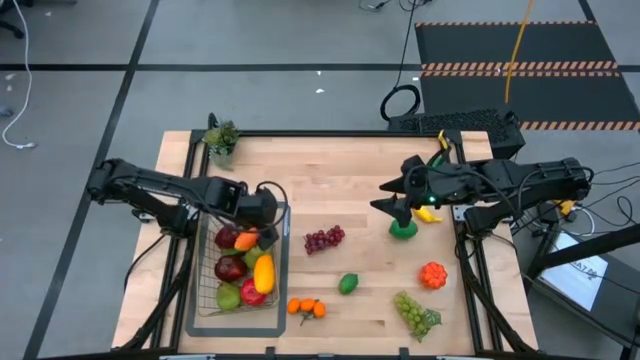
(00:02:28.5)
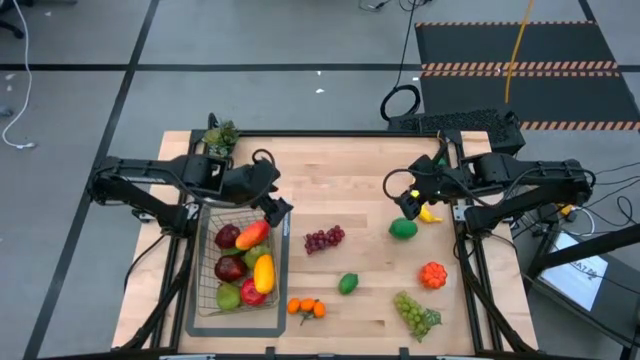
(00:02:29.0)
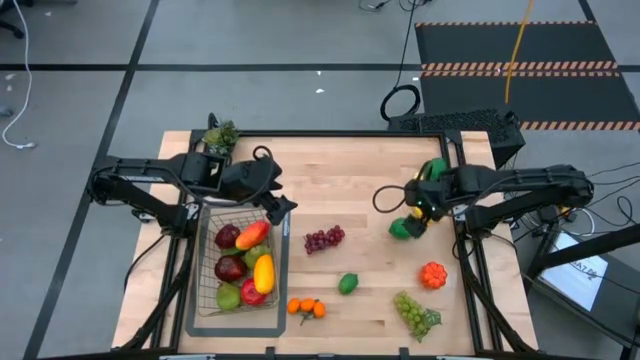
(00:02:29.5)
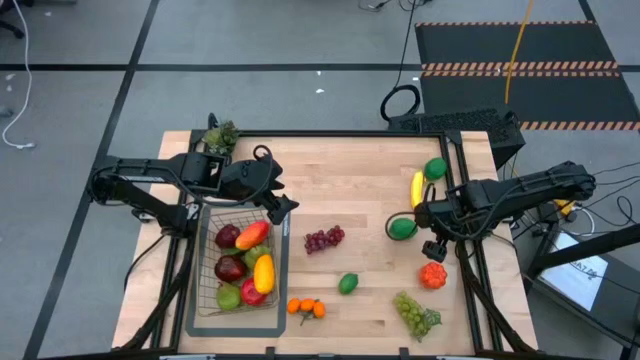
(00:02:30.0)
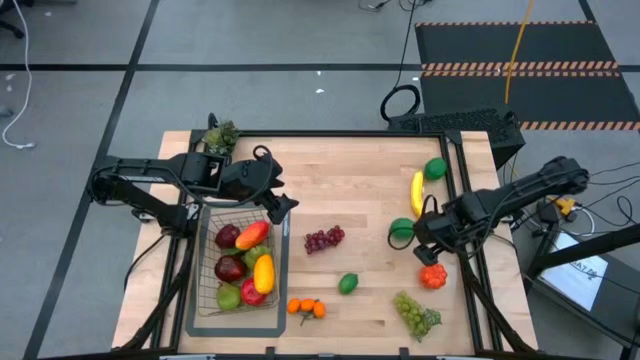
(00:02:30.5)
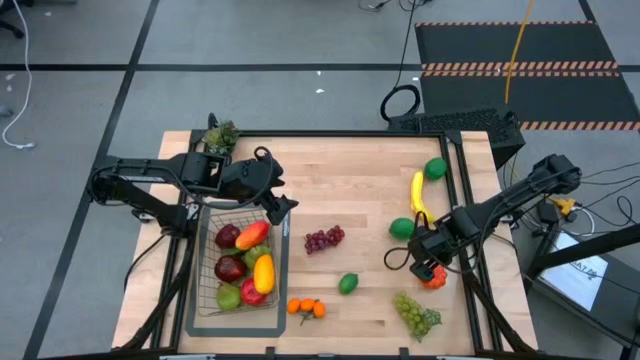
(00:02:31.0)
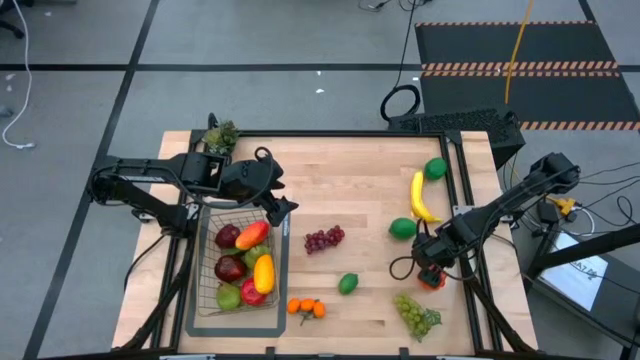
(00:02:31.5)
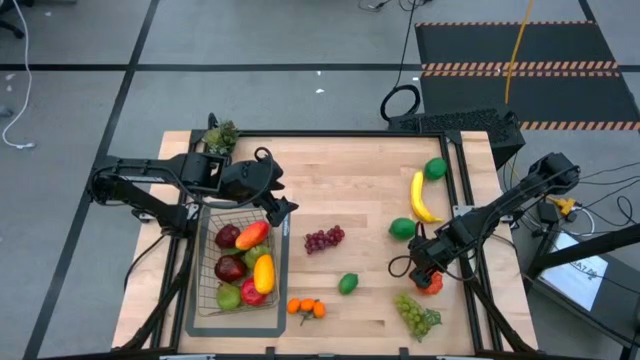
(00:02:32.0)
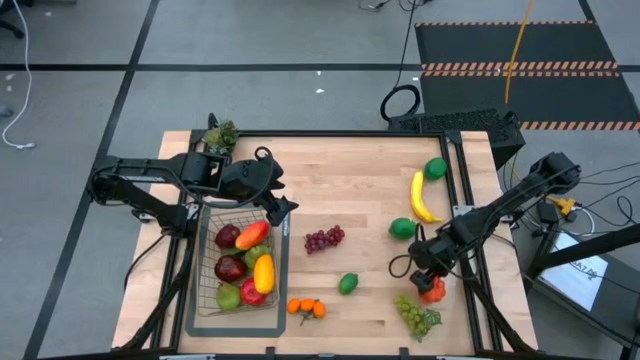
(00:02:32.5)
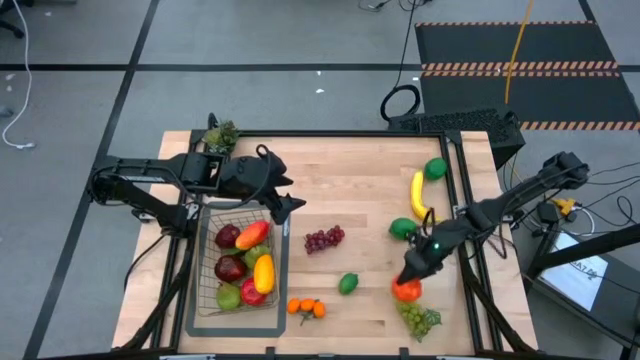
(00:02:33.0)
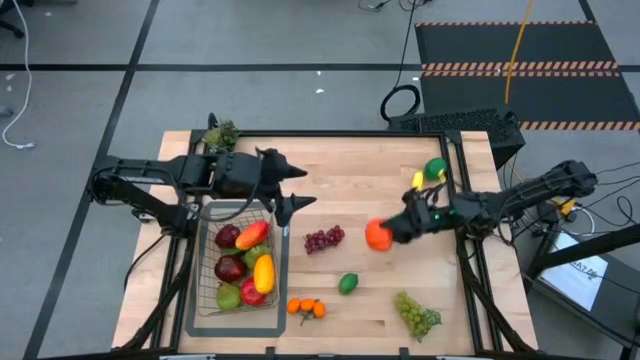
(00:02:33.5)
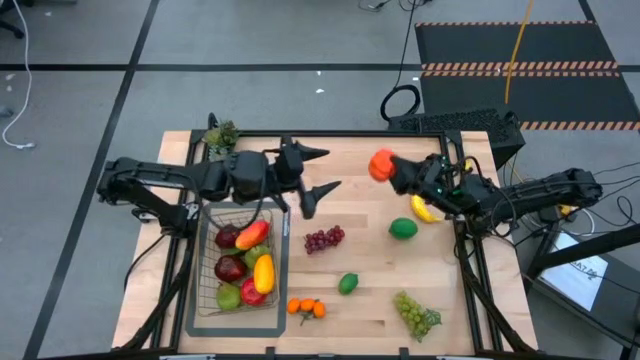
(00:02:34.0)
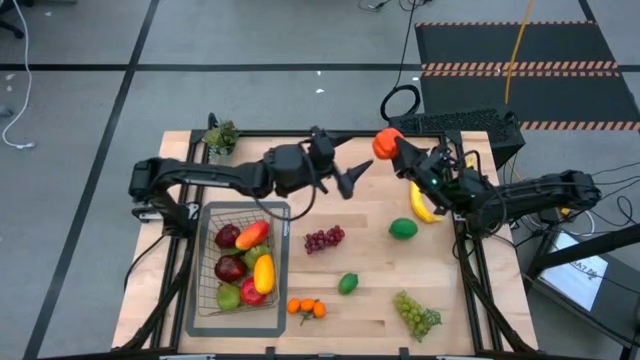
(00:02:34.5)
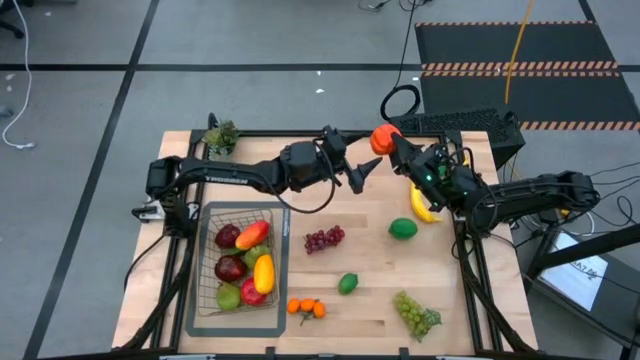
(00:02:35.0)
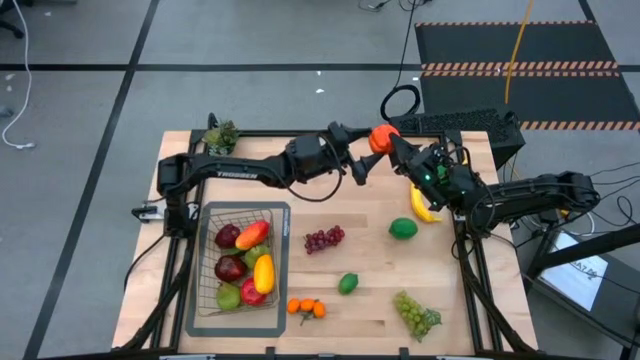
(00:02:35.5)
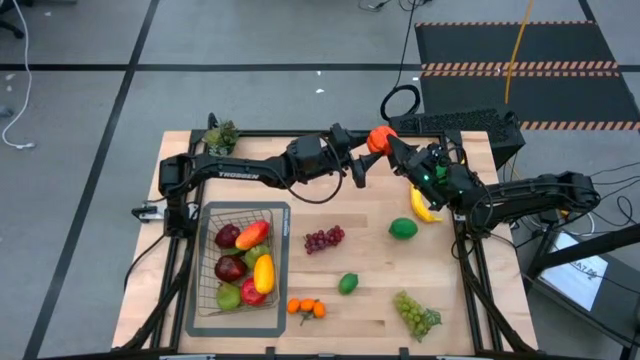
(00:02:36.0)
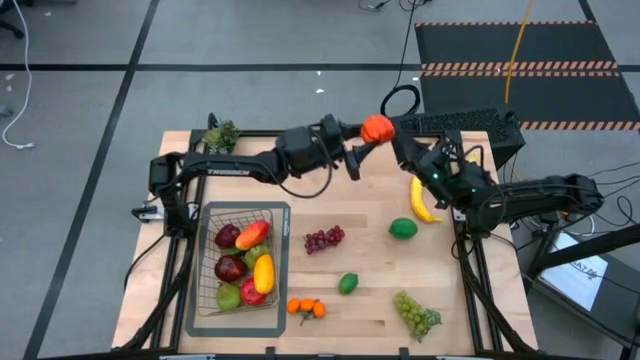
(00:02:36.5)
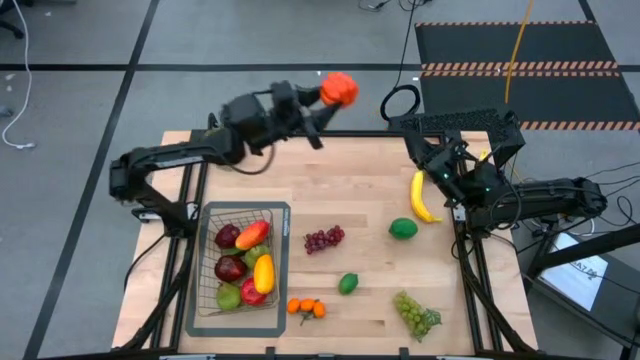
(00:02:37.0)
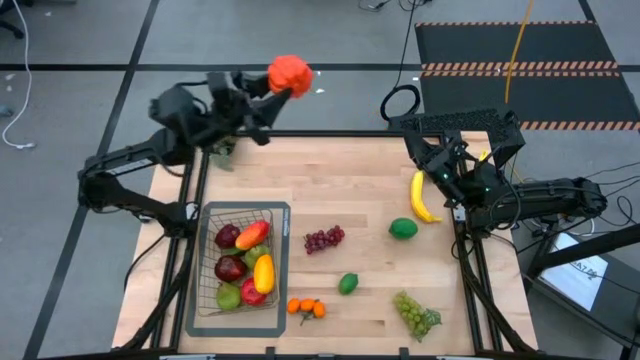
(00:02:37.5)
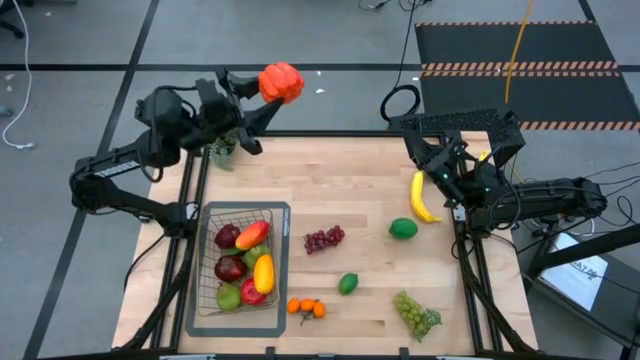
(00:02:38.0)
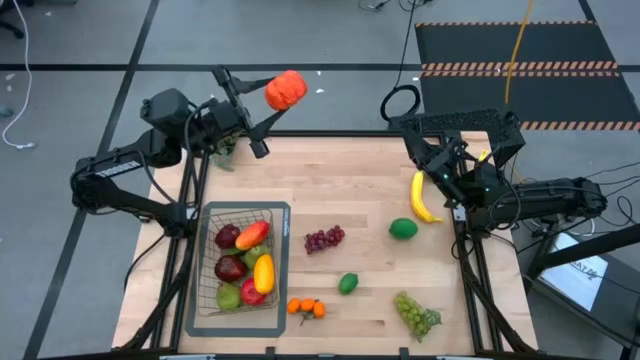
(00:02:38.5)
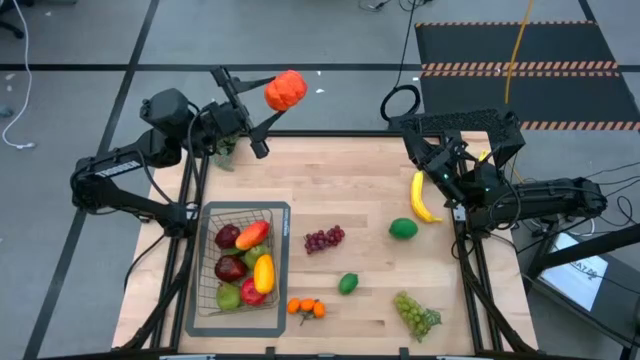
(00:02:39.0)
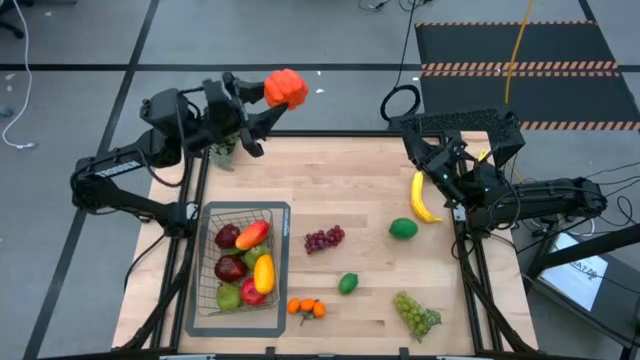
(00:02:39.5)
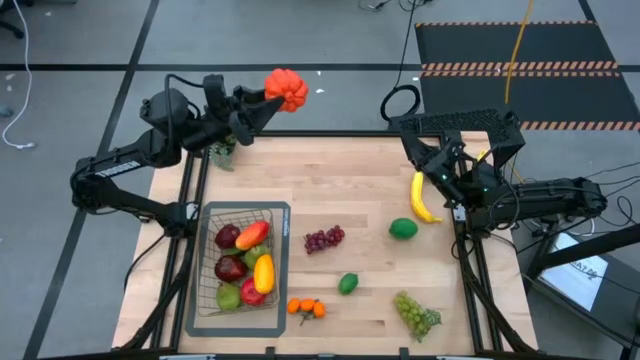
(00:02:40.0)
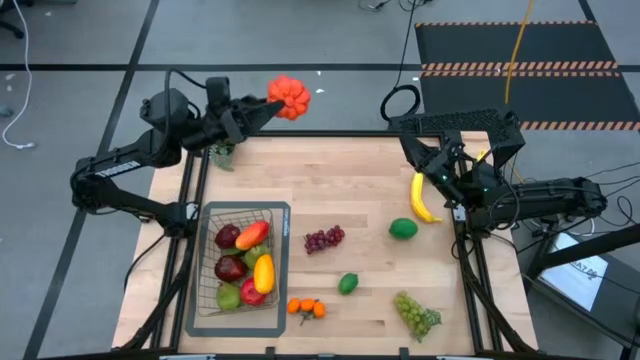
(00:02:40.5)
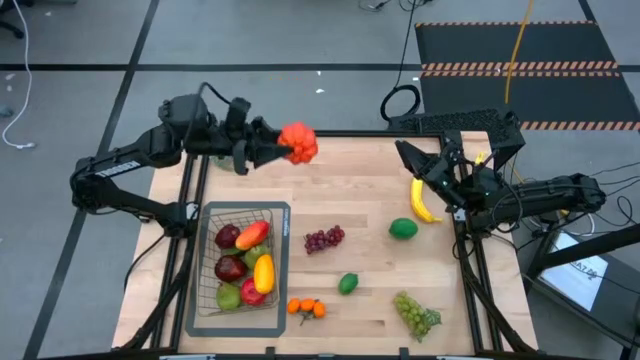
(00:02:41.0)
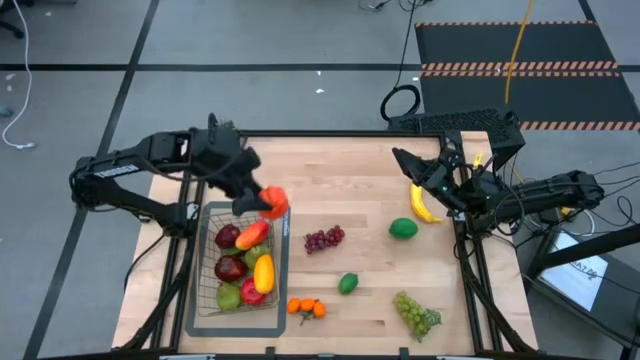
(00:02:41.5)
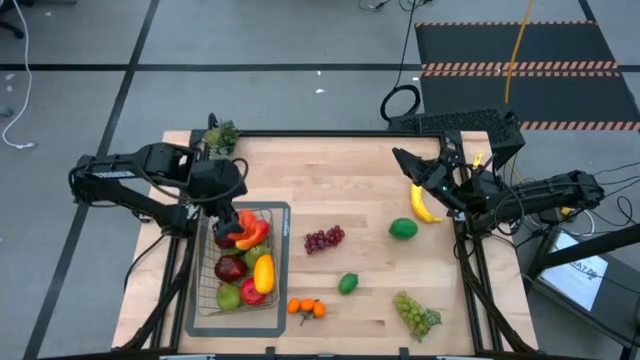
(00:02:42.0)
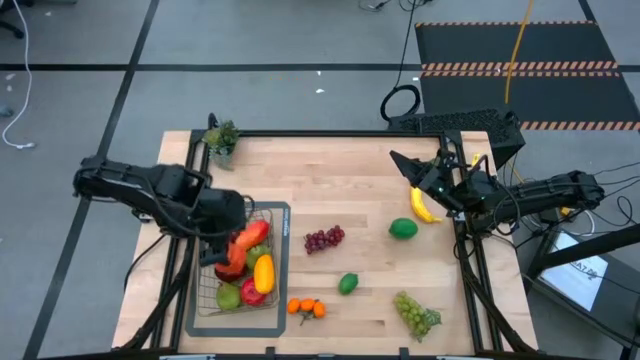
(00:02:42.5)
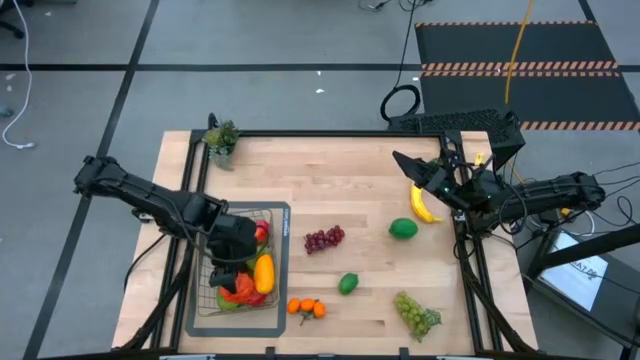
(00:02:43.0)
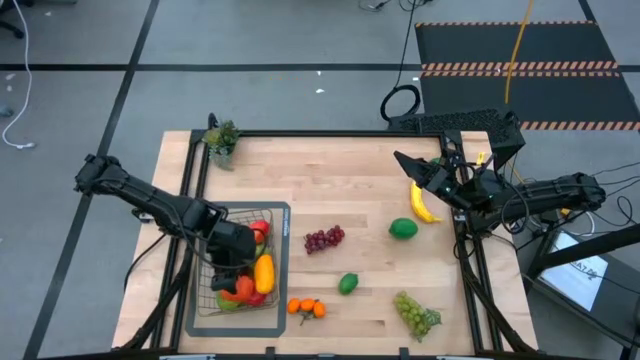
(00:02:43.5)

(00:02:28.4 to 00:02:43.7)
Task: Build produce basket
Put the orange pumpkin into the wire basket

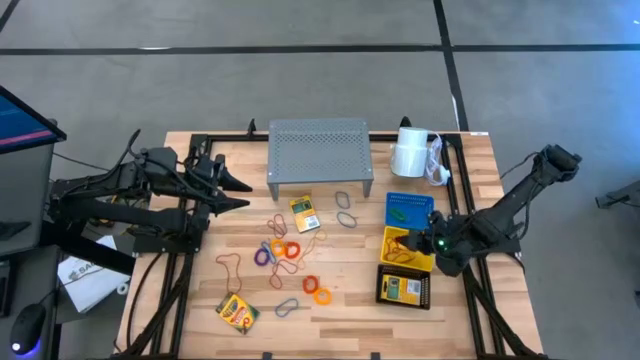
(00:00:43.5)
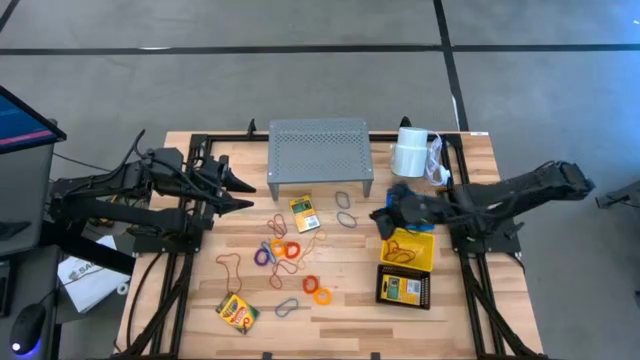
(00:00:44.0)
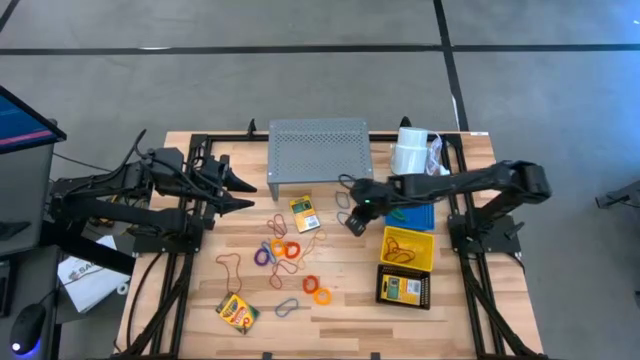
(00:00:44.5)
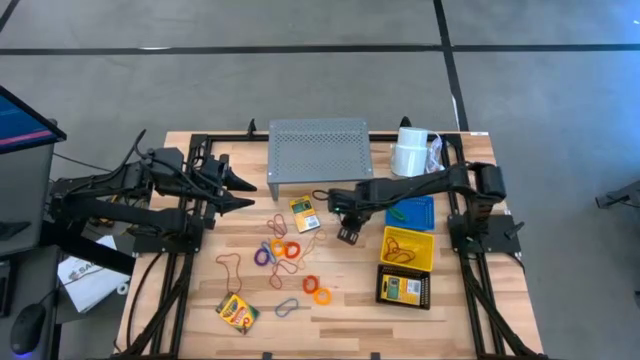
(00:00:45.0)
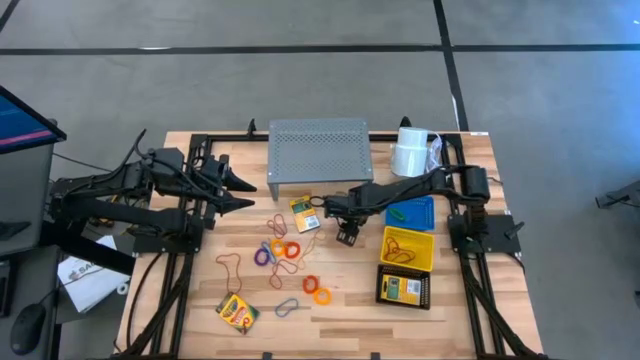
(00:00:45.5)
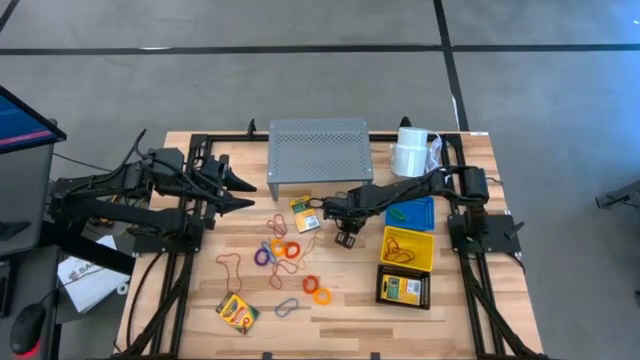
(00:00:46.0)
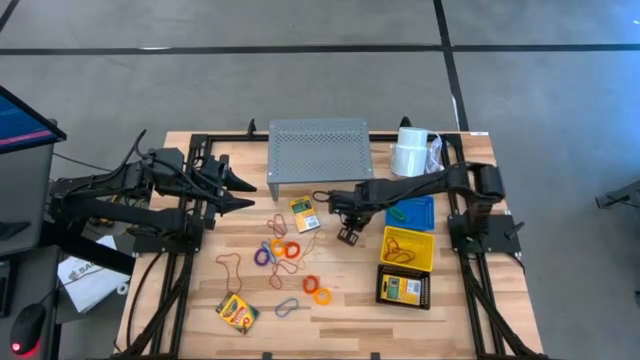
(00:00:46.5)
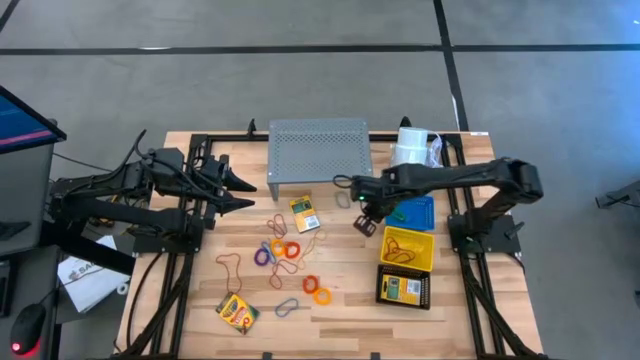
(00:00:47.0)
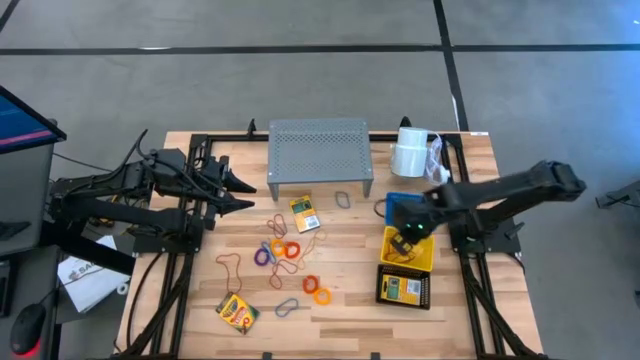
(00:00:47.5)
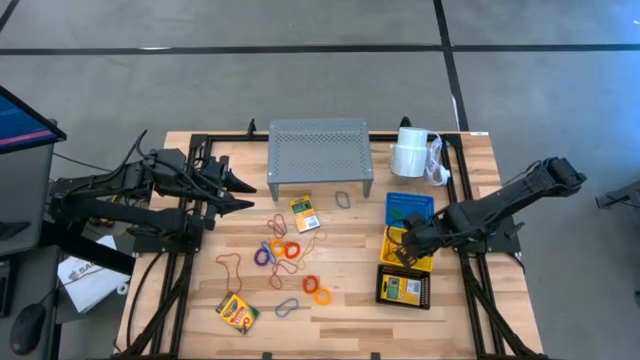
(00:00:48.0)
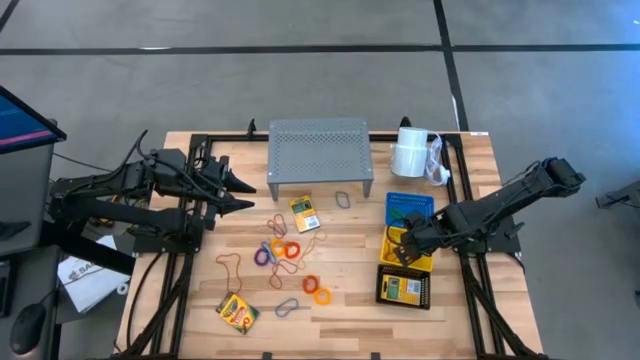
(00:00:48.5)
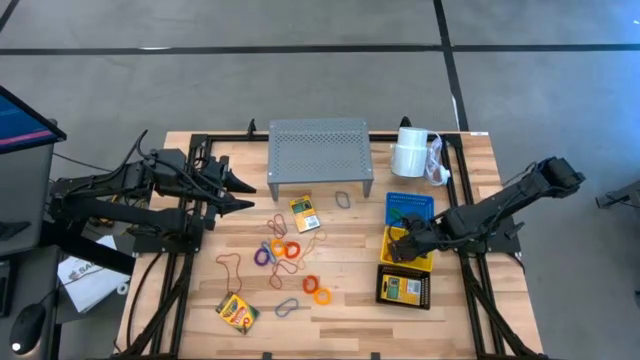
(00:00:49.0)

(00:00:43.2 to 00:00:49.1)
Task: Pick & Place Office Desk Supplies
Put the blue rubber band into the yellow basket
